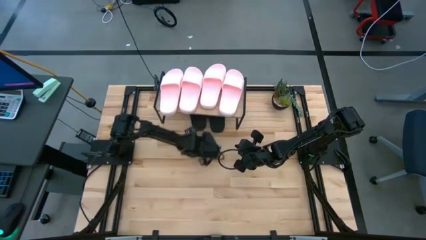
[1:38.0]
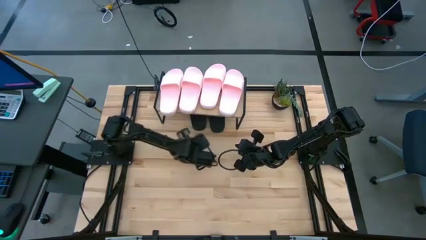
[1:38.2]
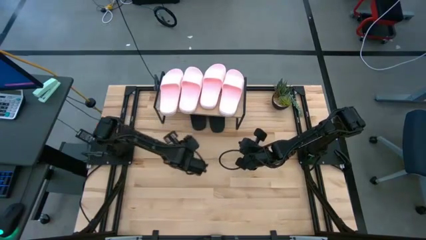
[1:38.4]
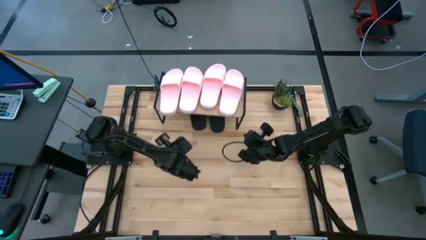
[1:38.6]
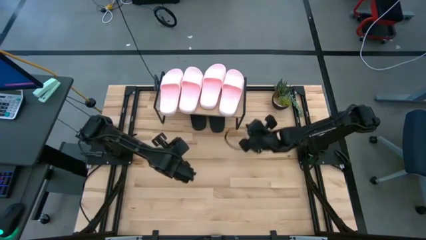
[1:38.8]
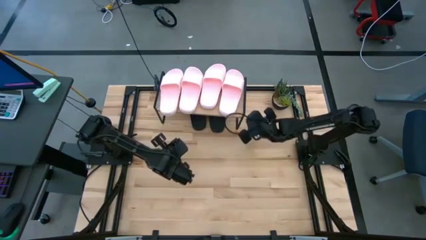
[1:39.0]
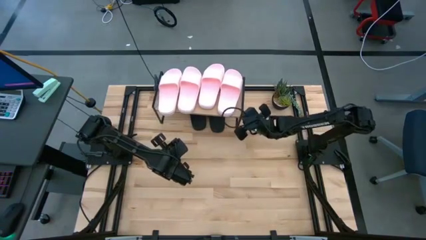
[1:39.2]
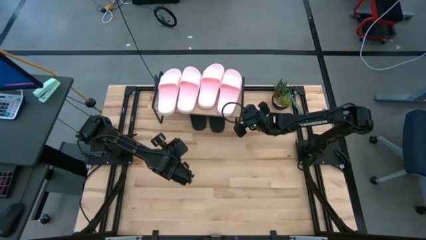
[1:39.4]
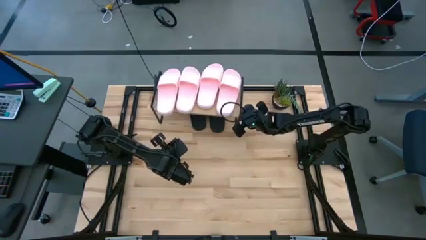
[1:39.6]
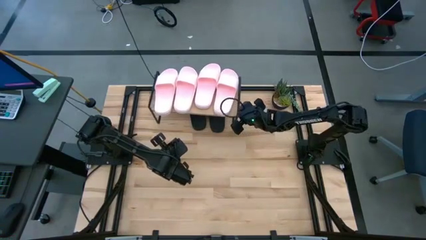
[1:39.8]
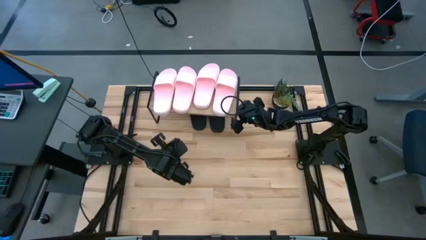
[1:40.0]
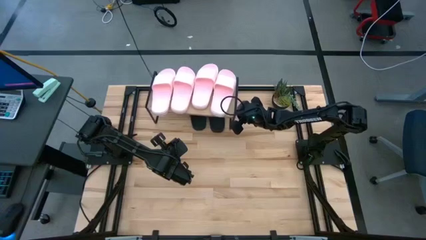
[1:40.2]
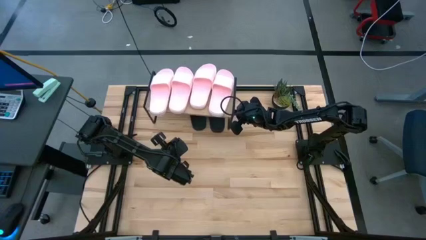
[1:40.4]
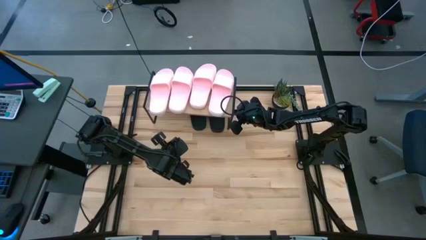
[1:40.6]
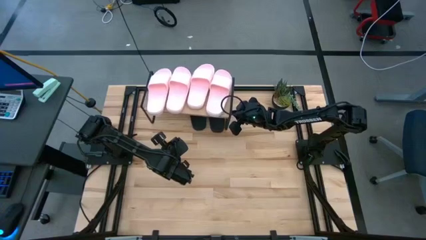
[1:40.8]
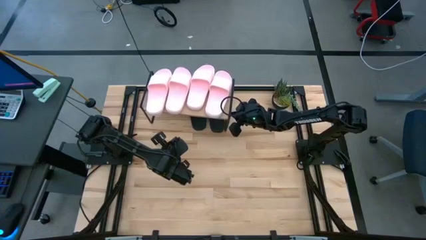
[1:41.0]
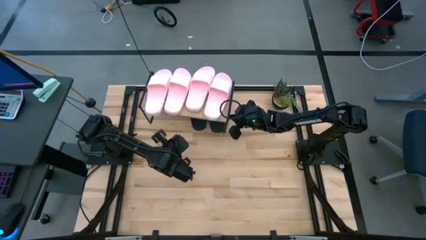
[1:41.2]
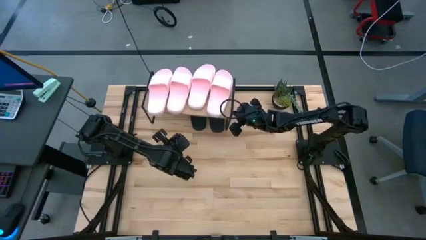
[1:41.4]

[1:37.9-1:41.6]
Task: Pick and place slides into the shelf
Adjust the shelf

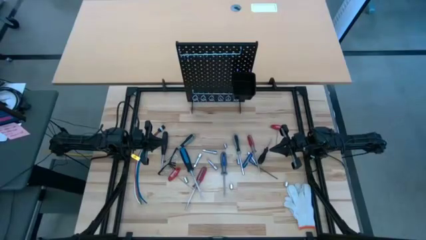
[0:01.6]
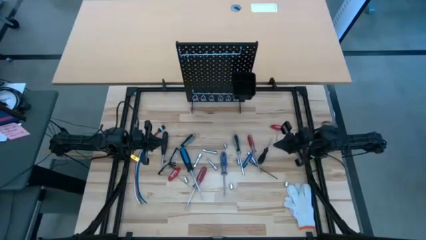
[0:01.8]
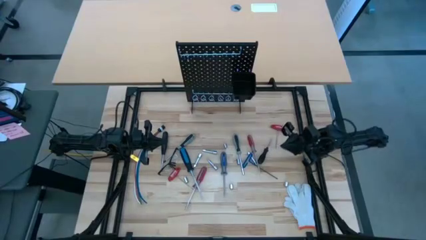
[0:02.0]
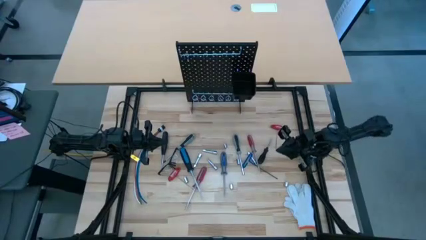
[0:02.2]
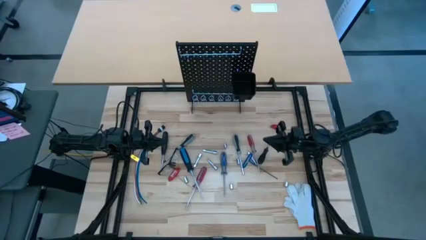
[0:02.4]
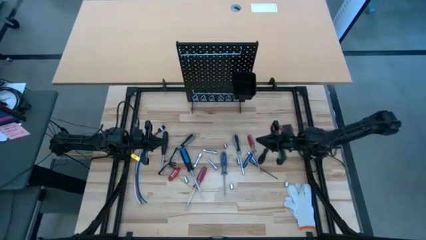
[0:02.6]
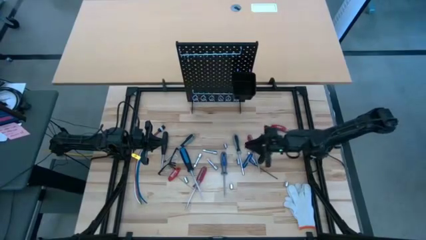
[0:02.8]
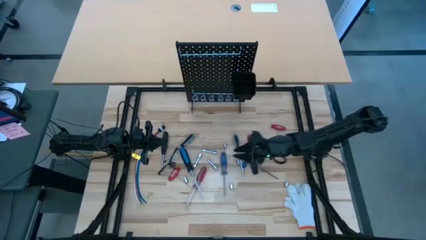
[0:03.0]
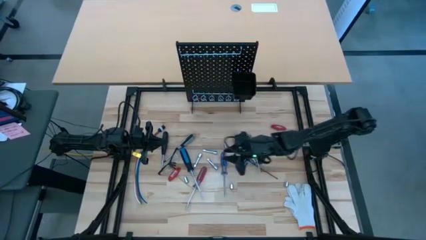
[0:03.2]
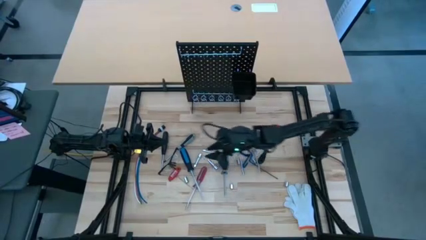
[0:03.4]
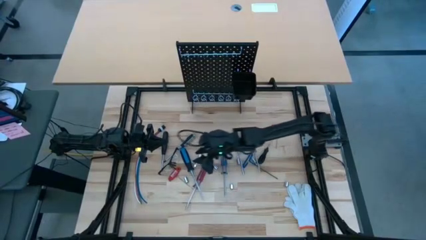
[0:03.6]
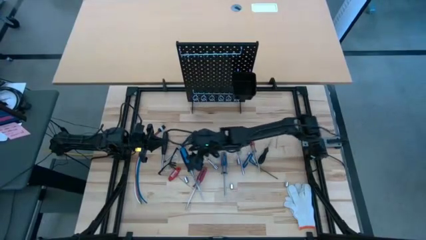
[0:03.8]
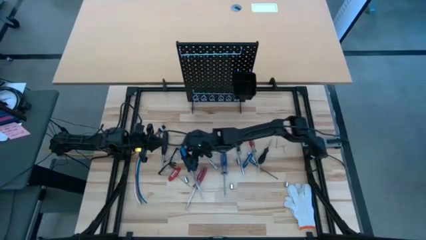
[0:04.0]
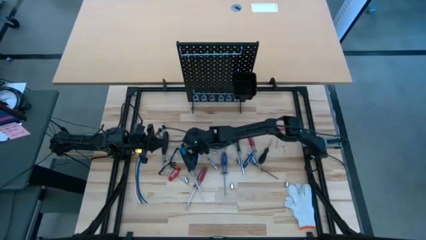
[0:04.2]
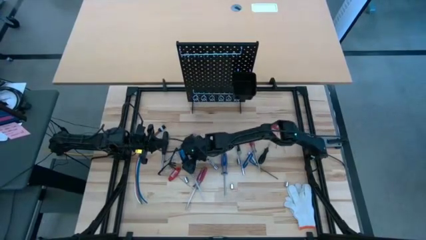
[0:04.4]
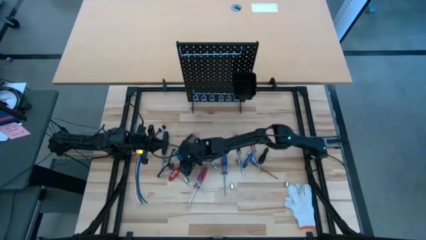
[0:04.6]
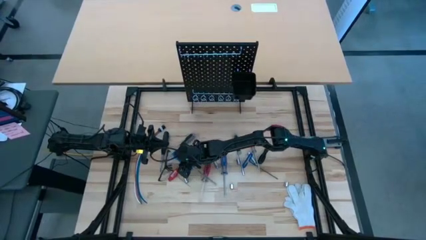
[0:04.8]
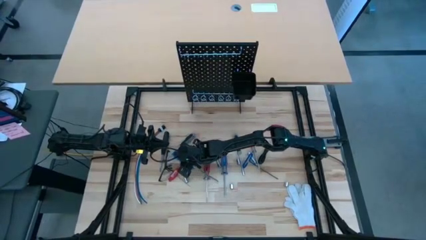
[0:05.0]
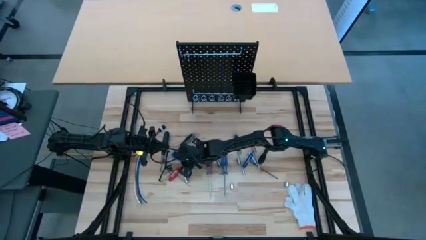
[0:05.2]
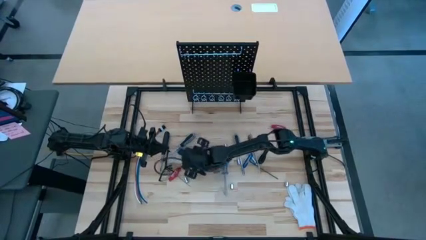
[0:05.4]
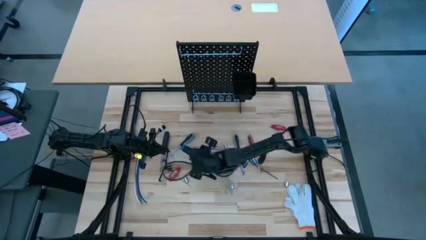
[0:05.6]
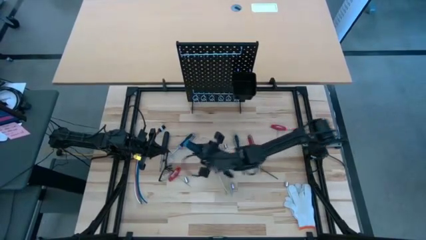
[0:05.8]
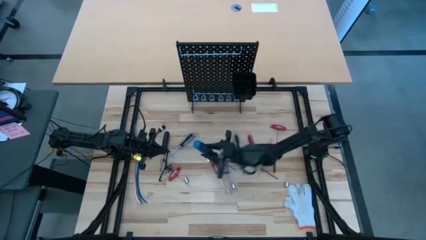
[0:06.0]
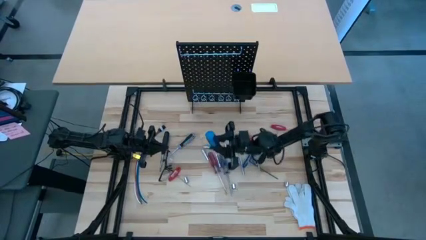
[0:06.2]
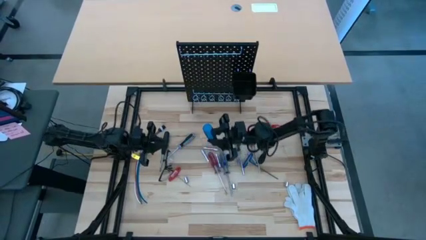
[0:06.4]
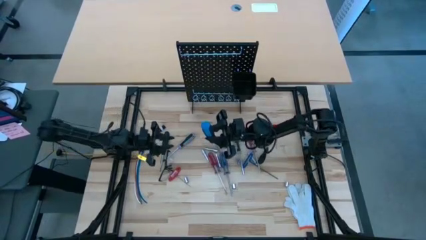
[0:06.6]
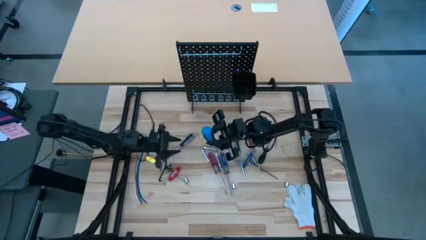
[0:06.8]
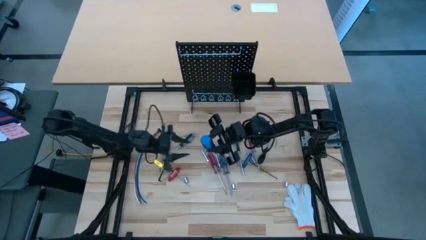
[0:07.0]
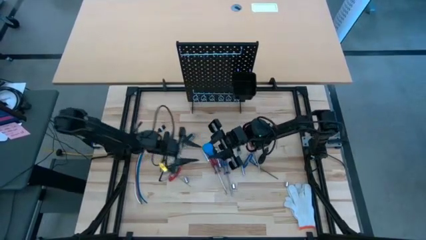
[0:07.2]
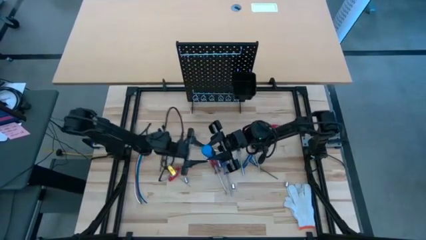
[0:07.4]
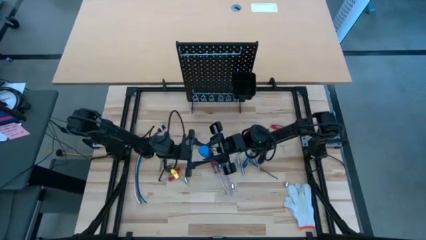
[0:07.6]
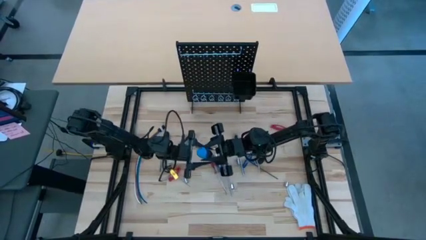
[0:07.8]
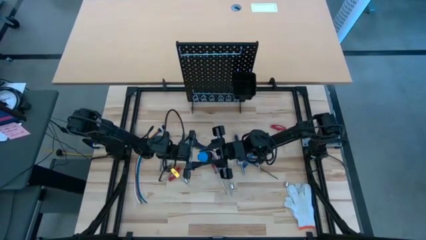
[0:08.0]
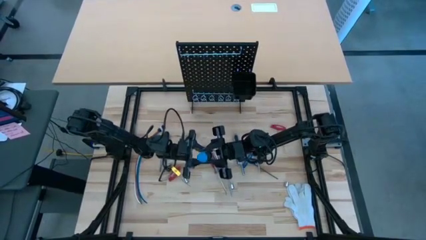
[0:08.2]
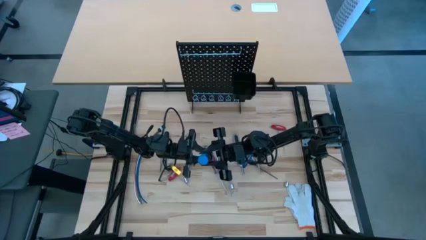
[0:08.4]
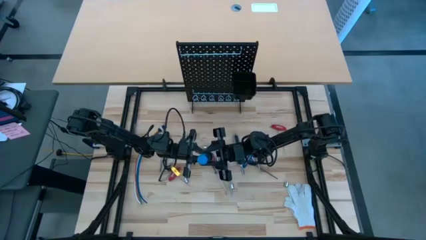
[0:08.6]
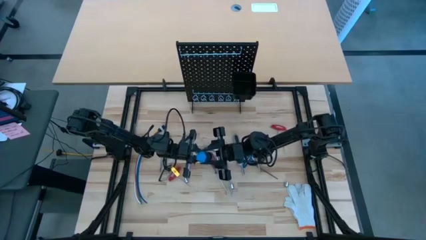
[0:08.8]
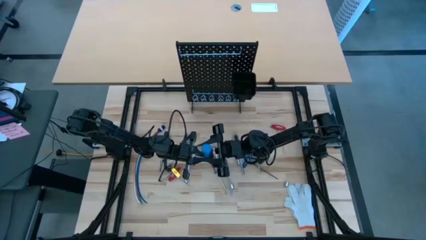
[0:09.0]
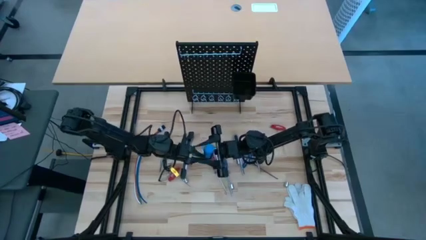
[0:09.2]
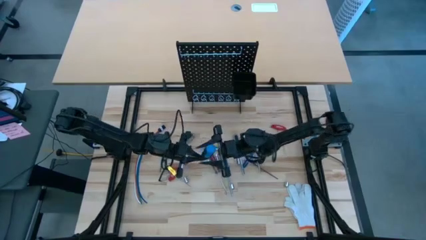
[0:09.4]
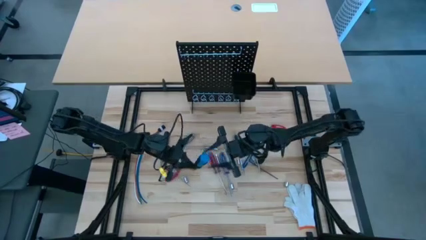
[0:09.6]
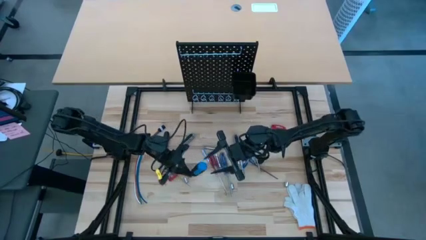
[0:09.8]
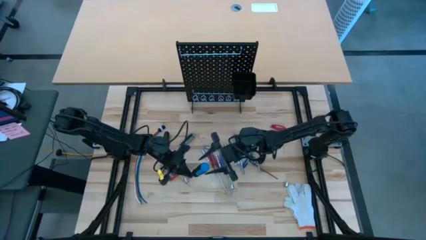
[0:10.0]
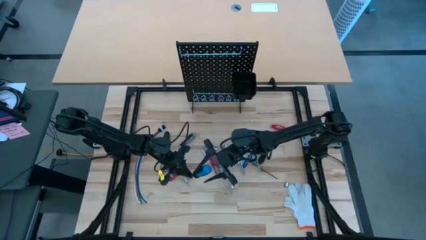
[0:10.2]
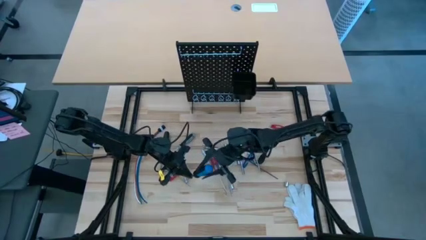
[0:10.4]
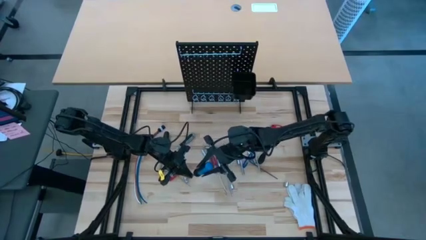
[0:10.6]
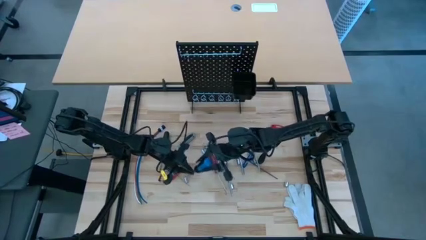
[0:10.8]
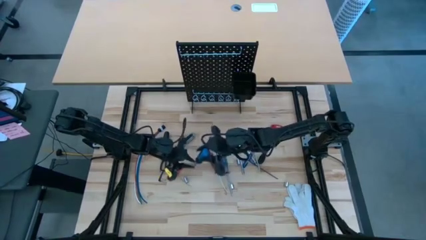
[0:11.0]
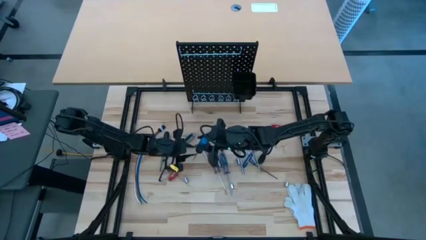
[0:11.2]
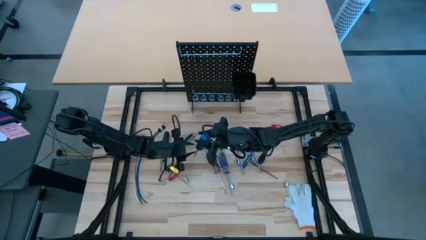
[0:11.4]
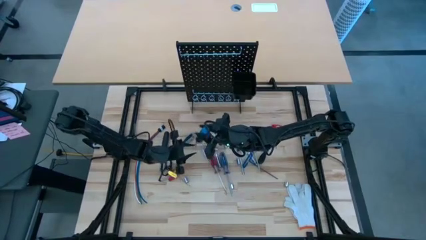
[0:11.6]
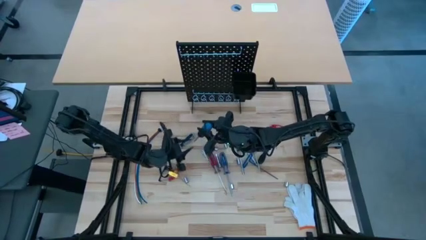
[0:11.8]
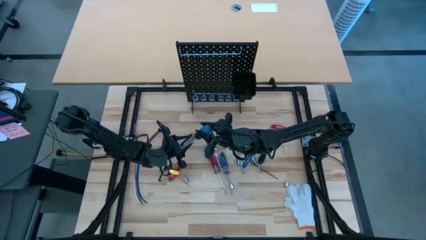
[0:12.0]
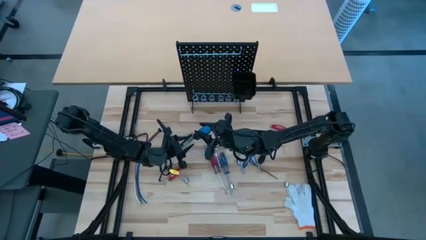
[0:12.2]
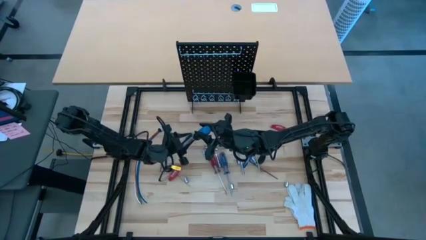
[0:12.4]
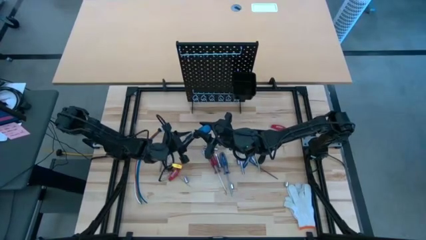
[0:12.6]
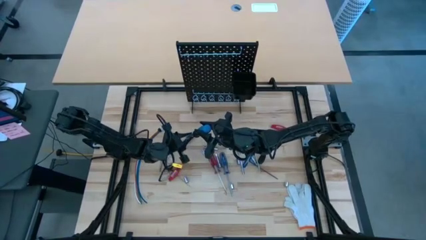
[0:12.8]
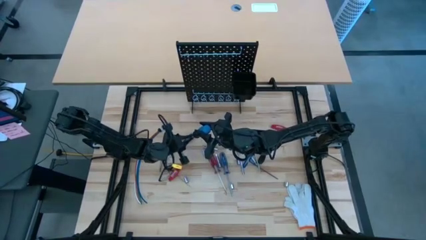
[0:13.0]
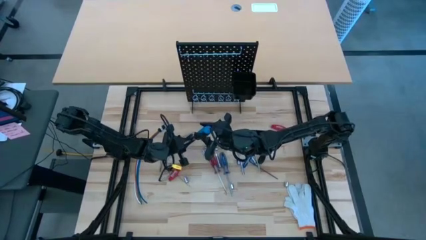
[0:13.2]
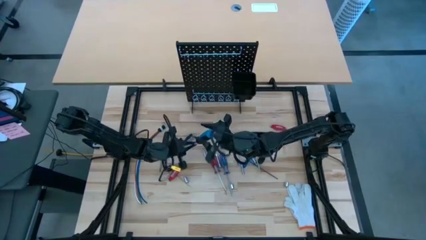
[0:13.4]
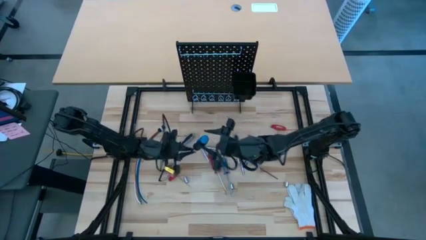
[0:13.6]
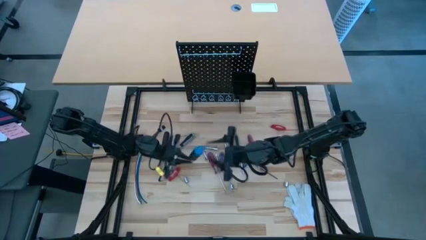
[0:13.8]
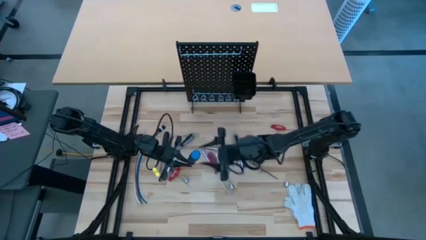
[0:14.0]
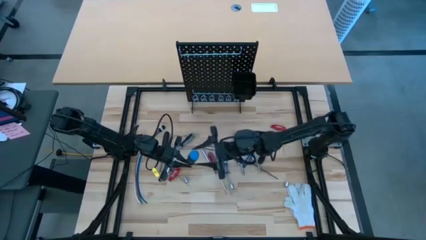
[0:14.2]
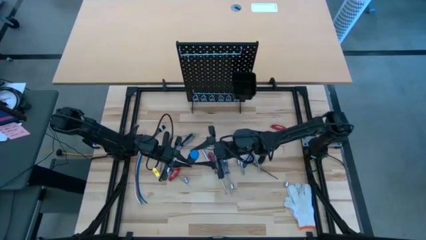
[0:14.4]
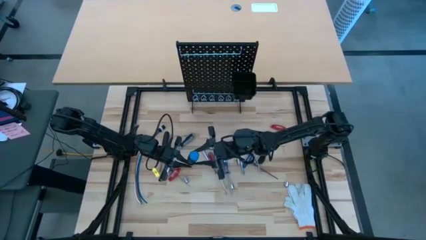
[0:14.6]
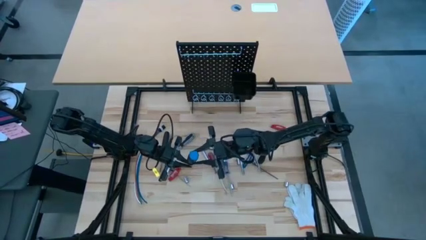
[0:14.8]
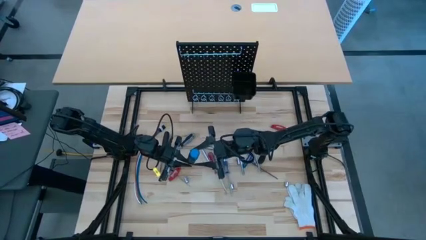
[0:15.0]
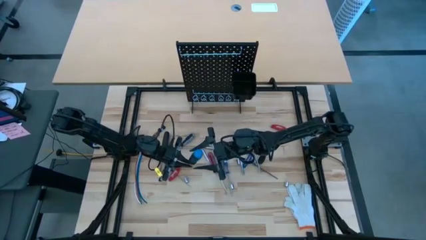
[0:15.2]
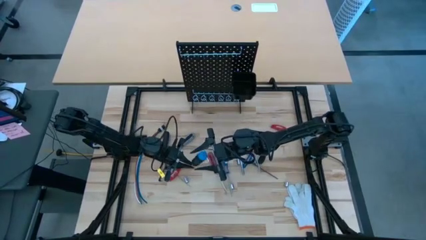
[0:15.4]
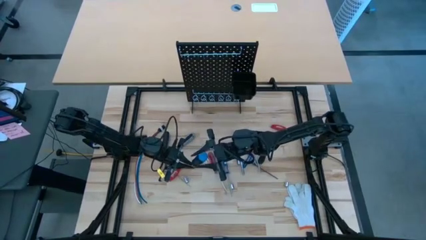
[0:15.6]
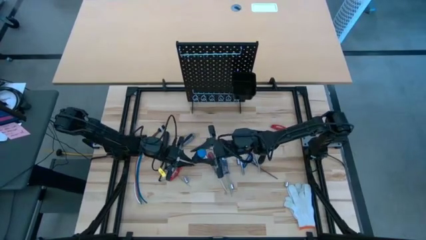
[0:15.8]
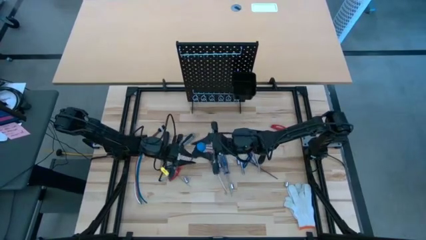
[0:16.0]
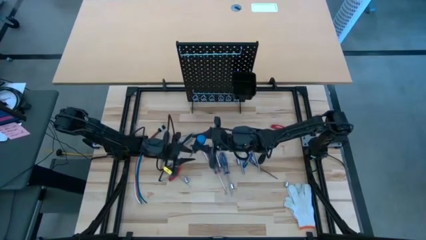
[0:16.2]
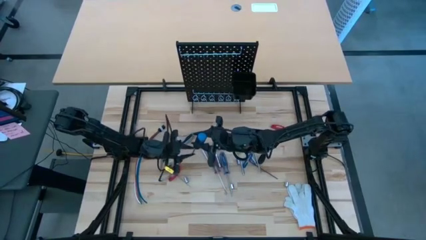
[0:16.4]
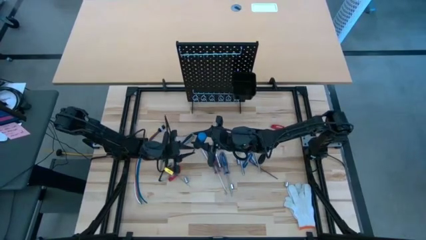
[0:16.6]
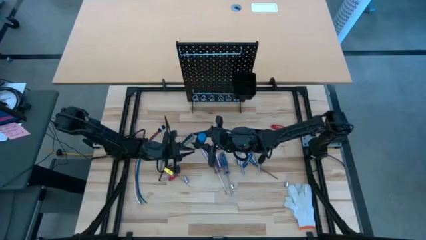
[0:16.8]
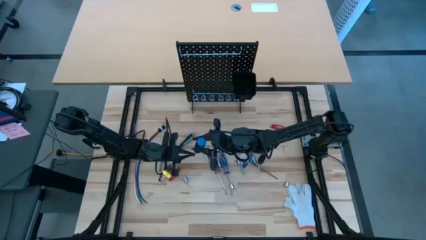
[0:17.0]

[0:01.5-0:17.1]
Task: Hang tools onto peg board
Hang the blue screwdriver on the pegboard
